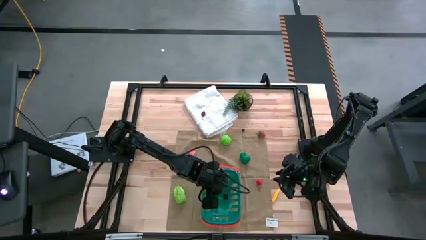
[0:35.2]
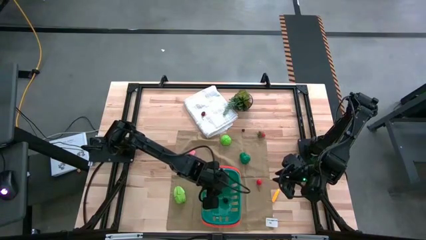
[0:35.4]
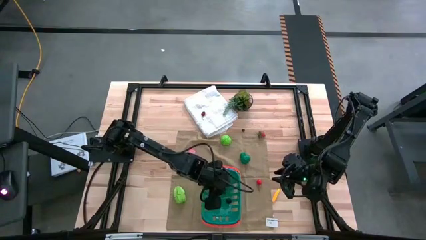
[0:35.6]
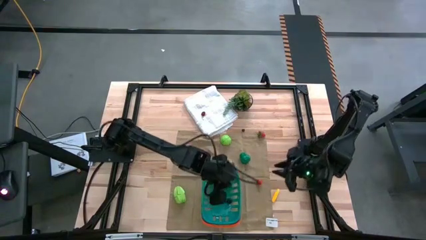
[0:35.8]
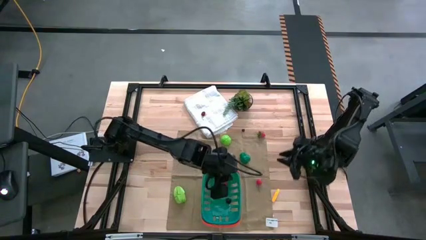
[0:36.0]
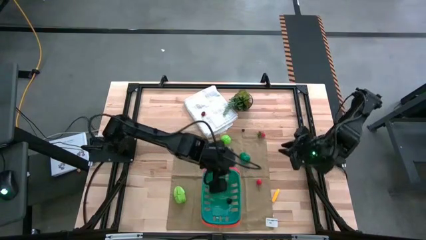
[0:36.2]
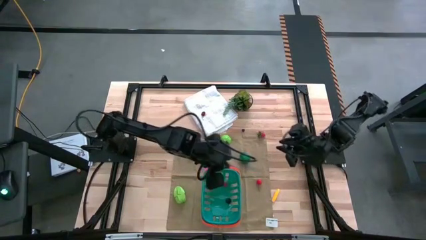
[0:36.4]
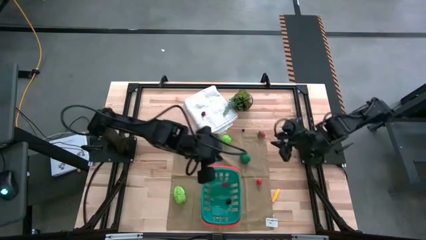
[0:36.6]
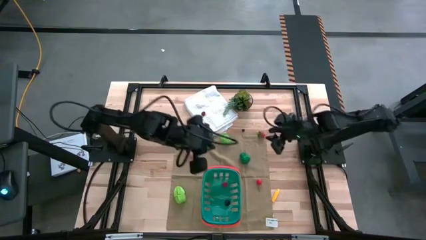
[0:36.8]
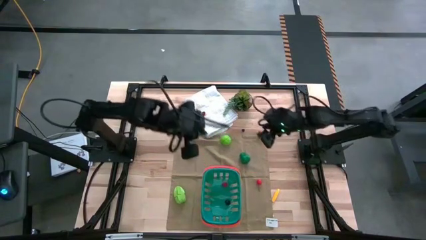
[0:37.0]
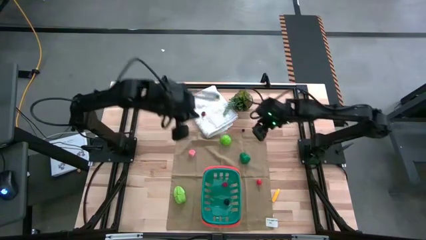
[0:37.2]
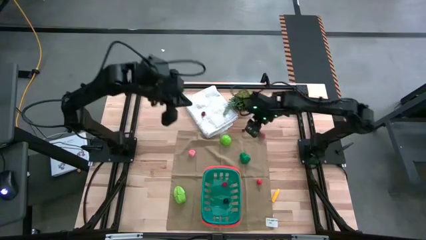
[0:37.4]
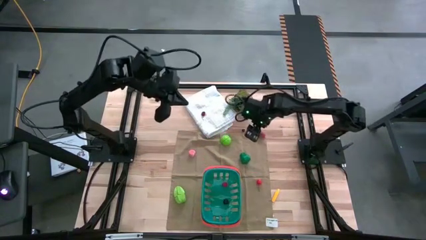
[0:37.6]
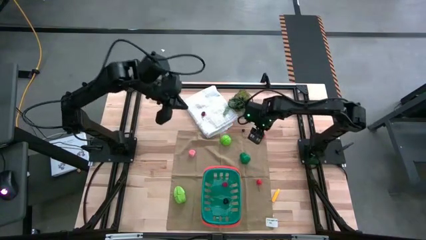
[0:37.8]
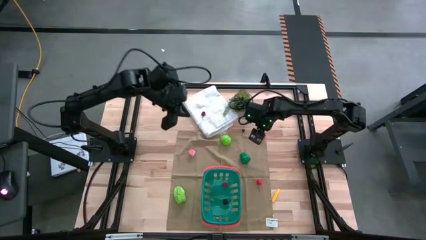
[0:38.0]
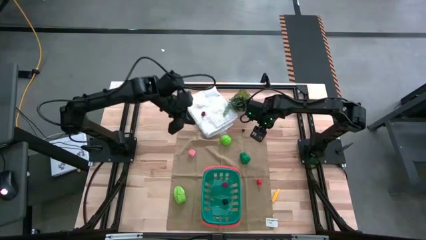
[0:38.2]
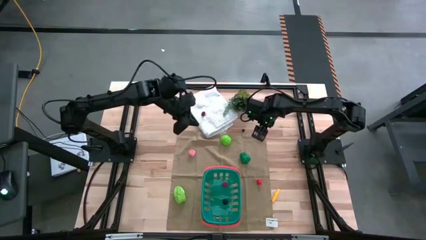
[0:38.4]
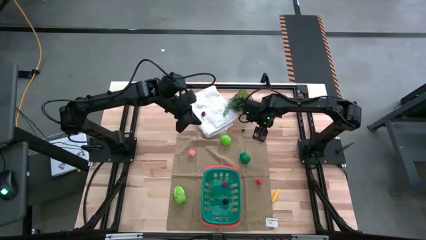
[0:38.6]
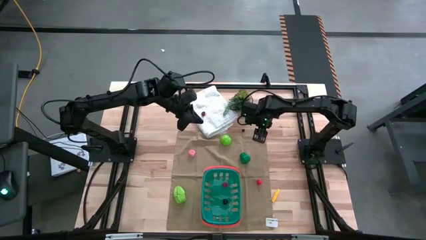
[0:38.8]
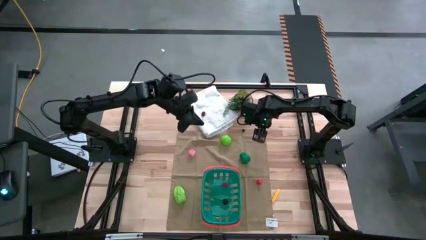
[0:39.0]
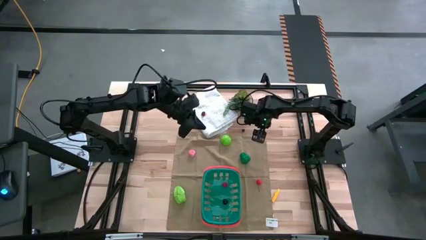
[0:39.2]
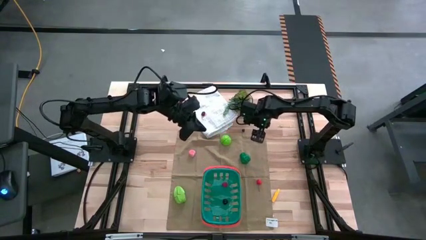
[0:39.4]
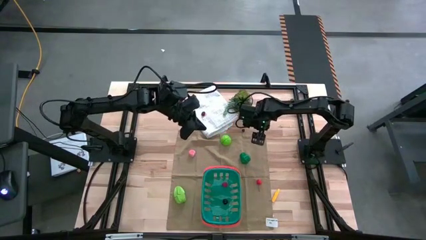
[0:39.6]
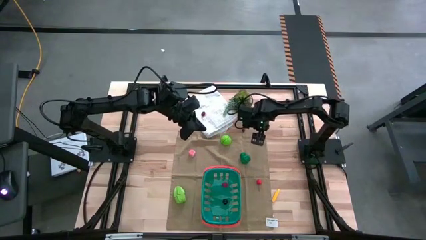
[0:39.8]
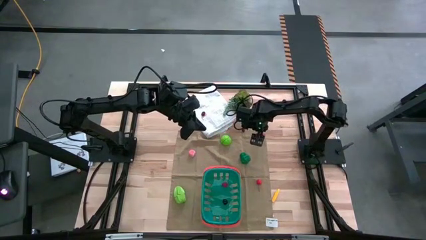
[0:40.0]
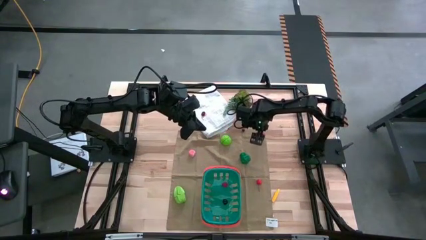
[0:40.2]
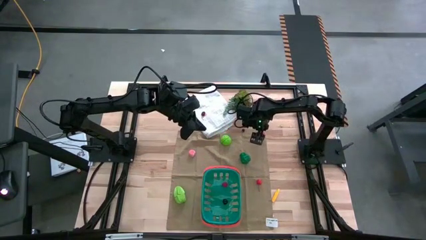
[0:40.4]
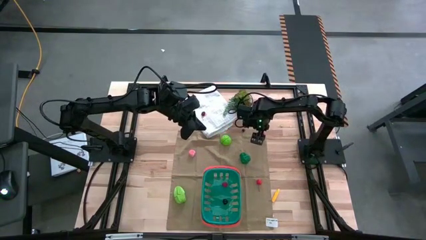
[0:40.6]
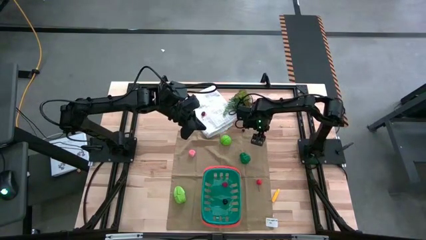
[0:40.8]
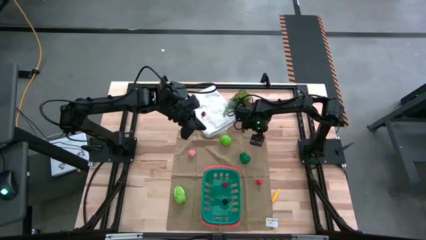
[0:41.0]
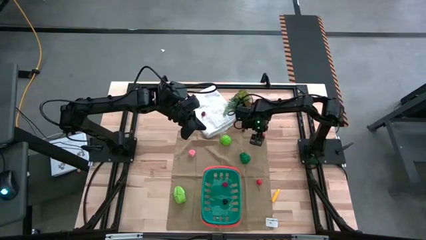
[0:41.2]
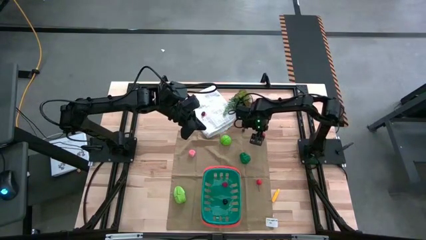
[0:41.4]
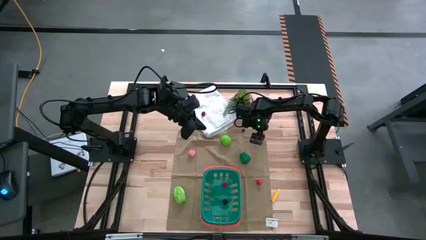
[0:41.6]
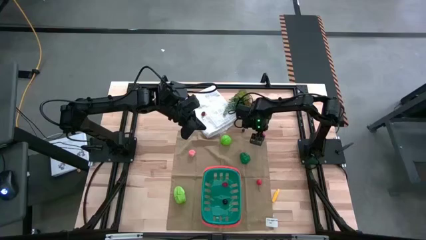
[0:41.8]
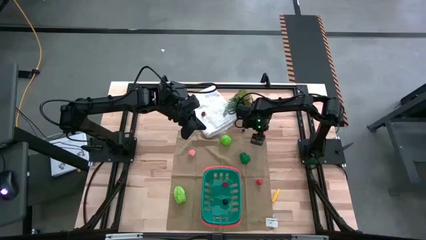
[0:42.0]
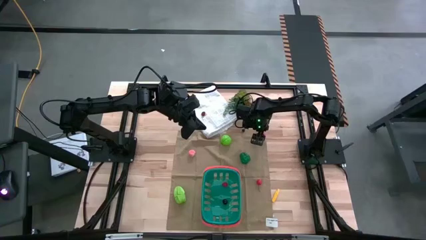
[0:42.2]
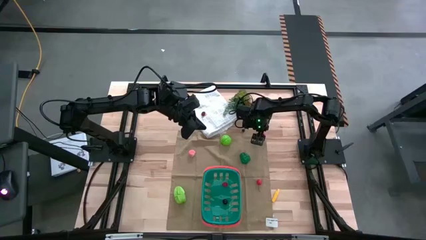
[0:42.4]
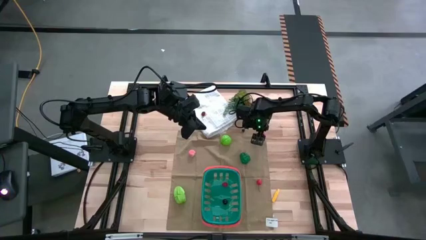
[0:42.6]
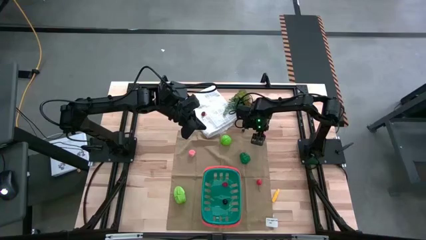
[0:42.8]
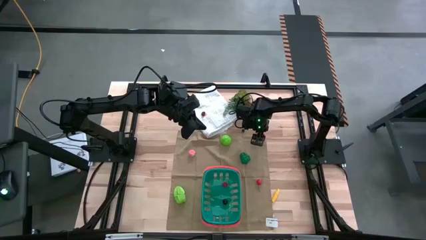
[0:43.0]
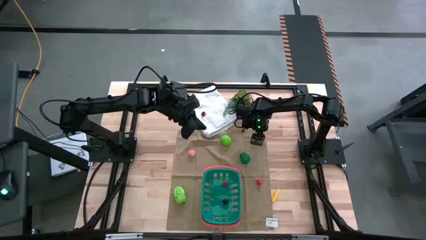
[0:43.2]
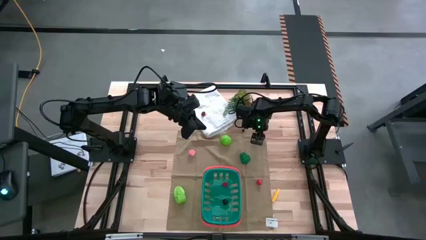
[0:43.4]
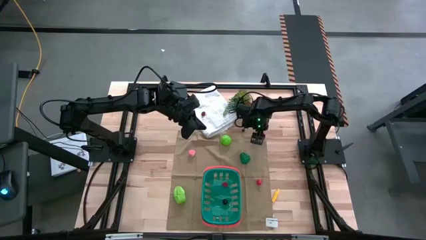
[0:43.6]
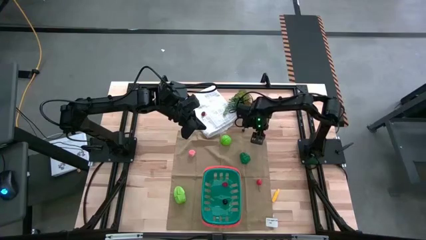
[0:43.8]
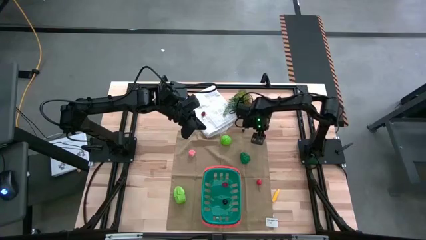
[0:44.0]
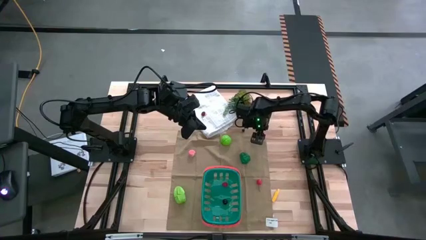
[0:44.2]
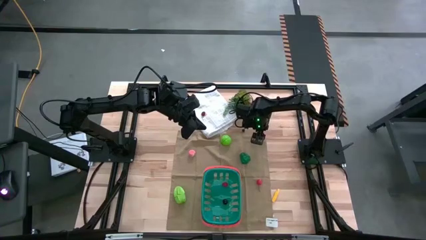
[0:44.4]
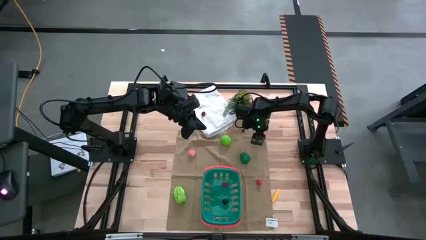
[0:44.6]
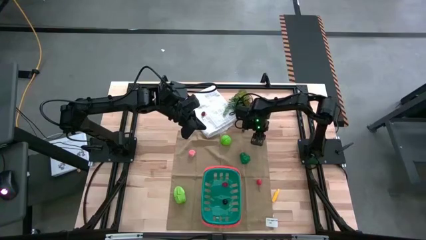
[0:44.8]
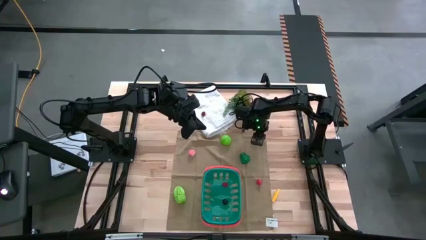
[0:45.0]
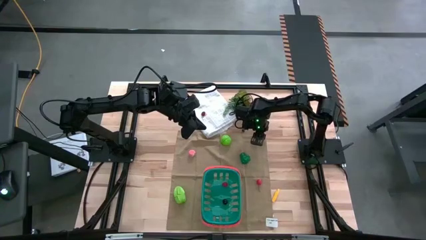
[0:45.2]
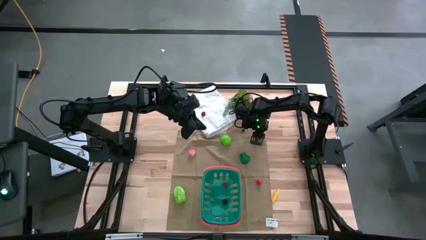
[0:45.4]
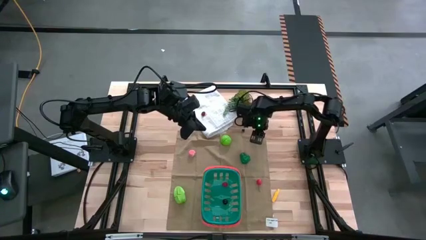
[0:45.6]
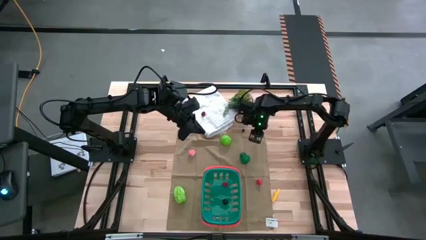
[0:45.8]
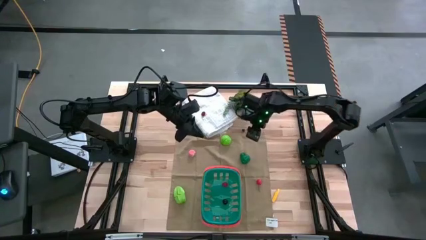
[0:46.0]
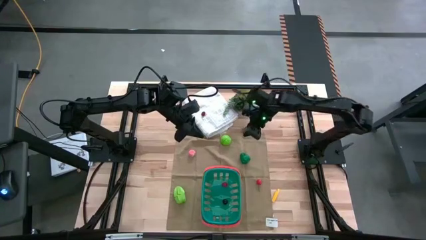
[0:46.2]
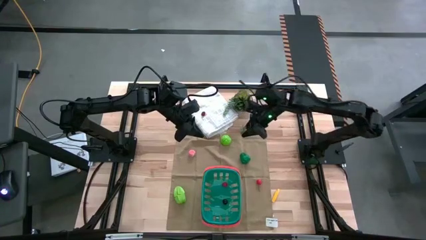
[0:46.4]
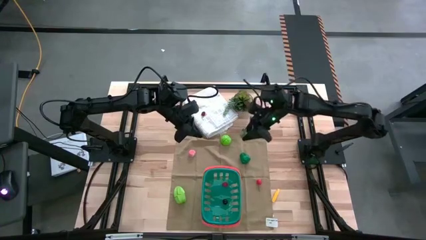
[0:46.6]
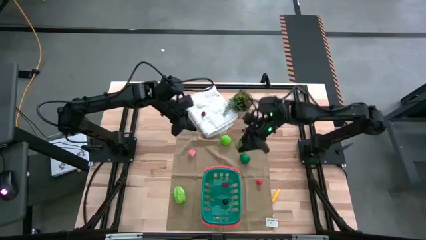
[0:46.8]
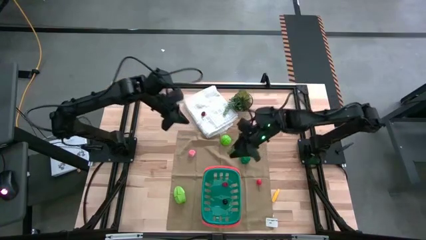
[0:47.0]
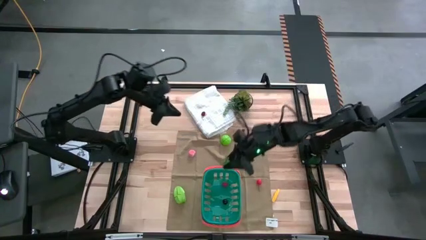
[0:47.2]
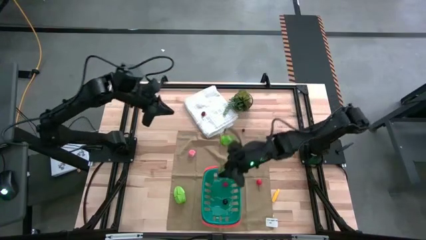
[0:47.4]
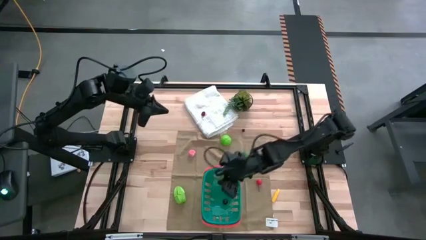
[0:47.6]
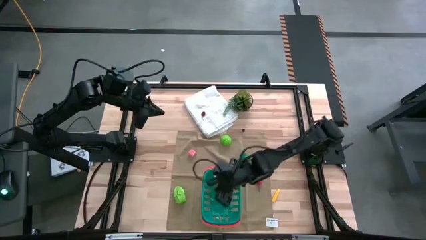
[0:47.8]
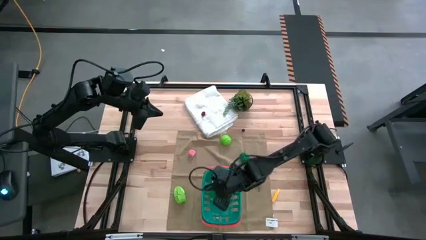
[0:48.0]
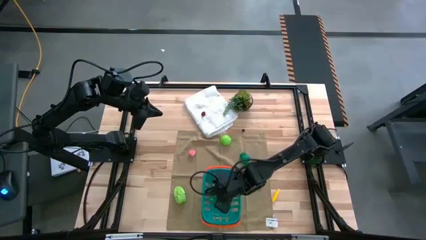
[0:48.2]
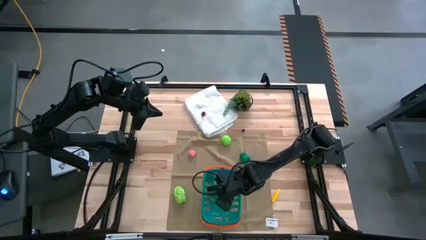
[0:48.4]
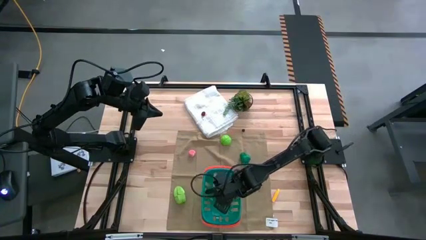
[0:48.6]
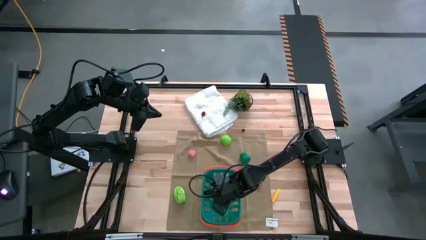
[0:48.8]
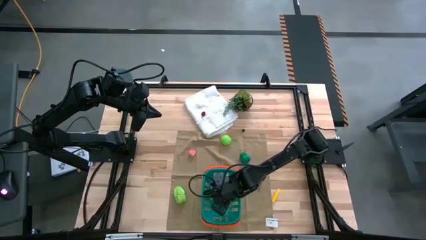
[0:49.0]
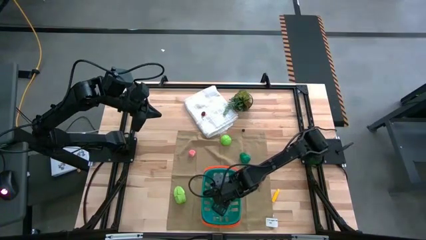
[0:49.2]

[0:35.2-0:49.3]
Task: Pick and placing Produce into tupperware
Put the red strawberry into the blue bin
